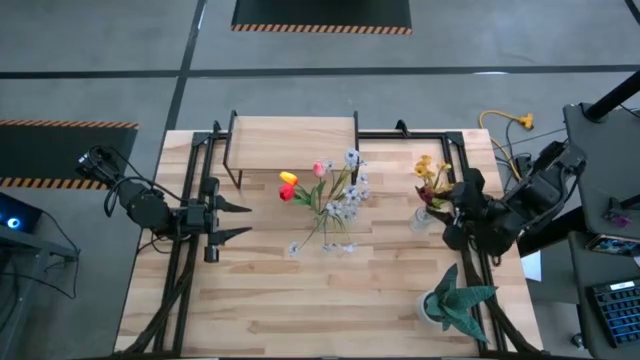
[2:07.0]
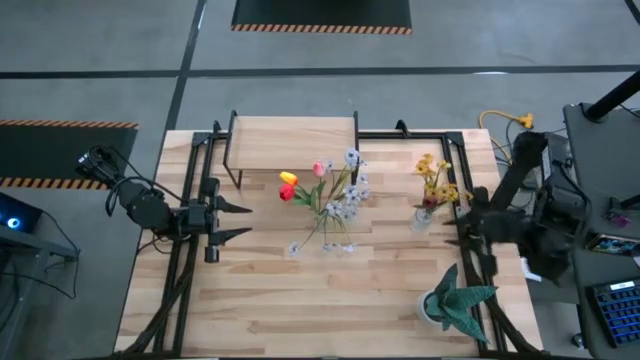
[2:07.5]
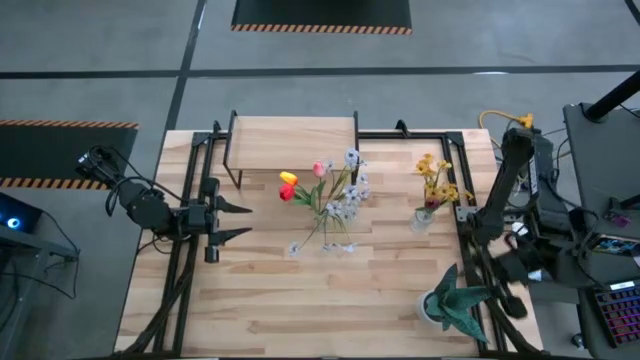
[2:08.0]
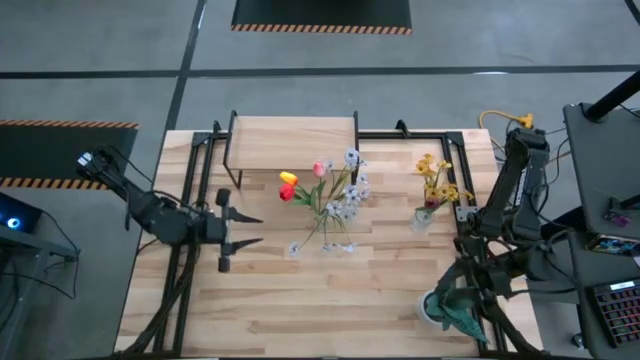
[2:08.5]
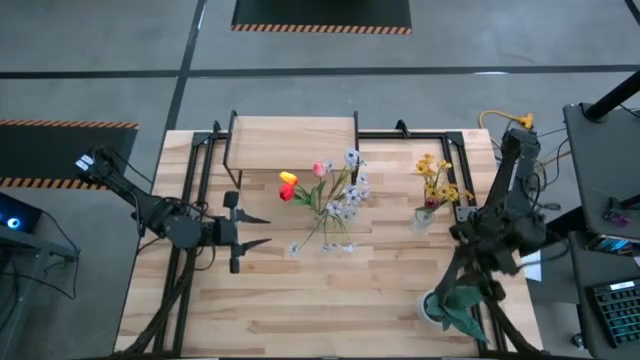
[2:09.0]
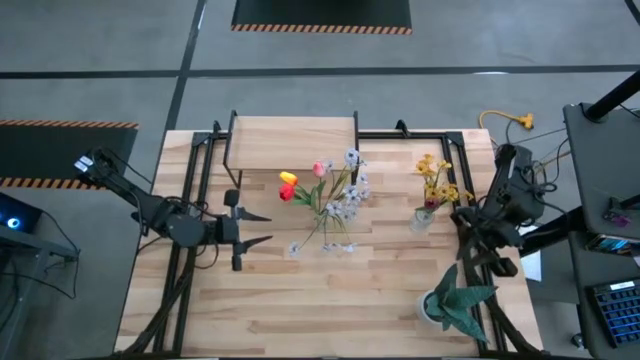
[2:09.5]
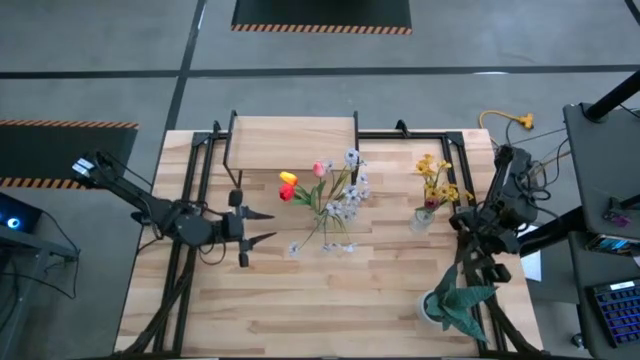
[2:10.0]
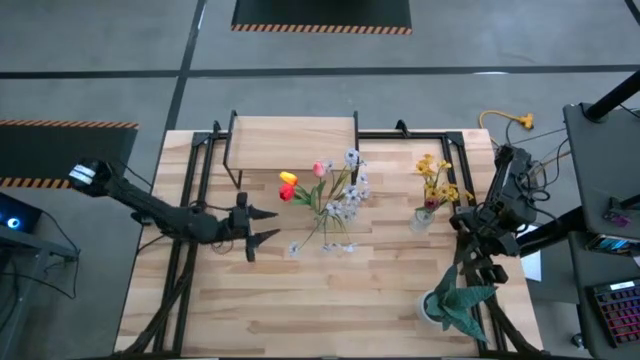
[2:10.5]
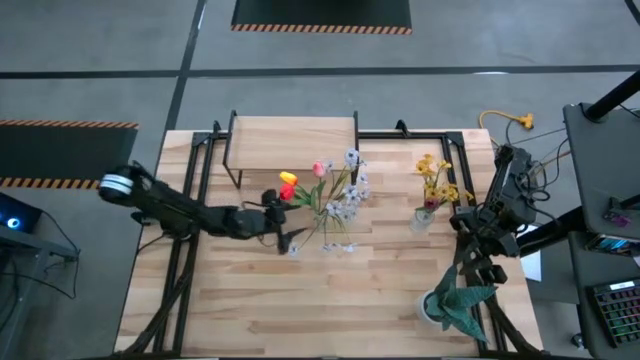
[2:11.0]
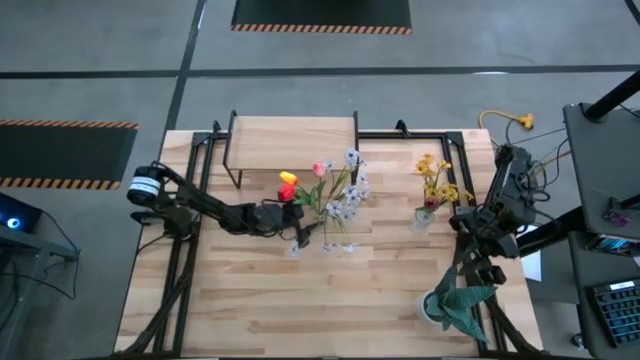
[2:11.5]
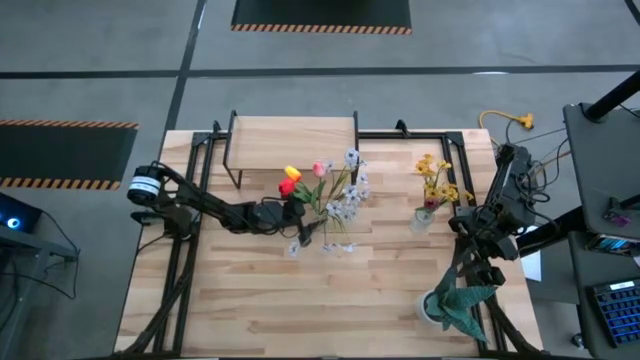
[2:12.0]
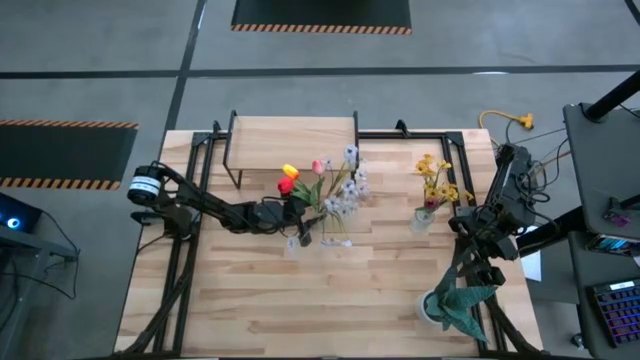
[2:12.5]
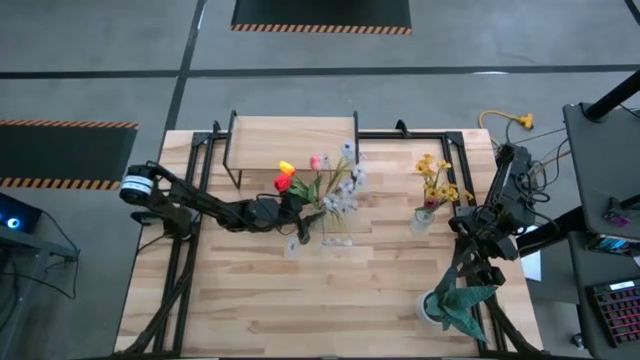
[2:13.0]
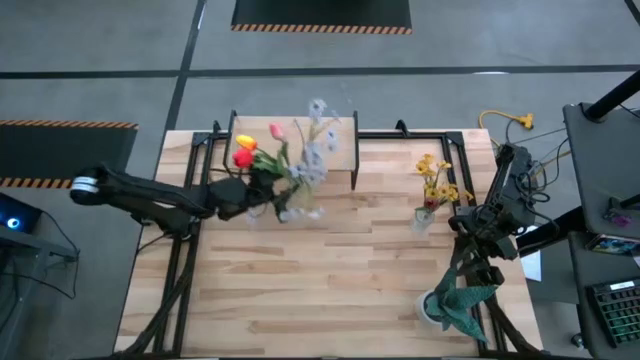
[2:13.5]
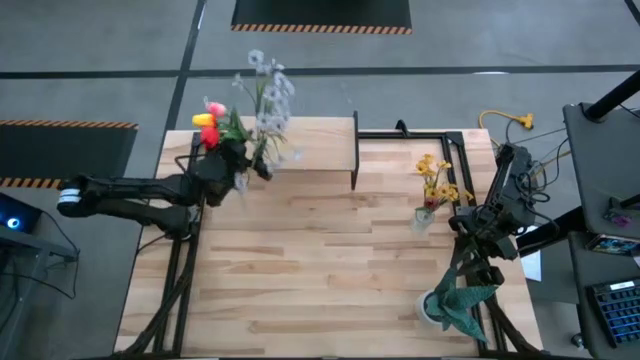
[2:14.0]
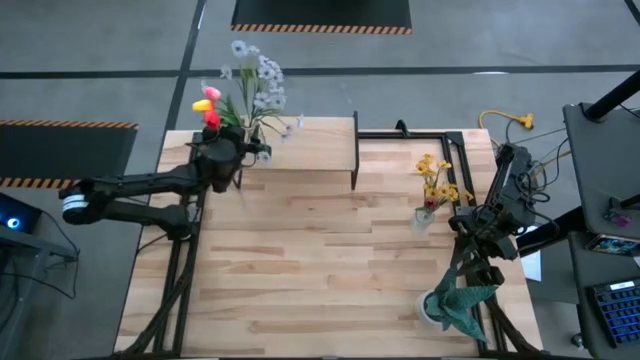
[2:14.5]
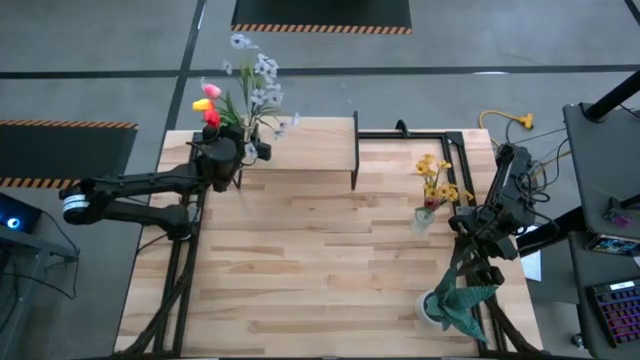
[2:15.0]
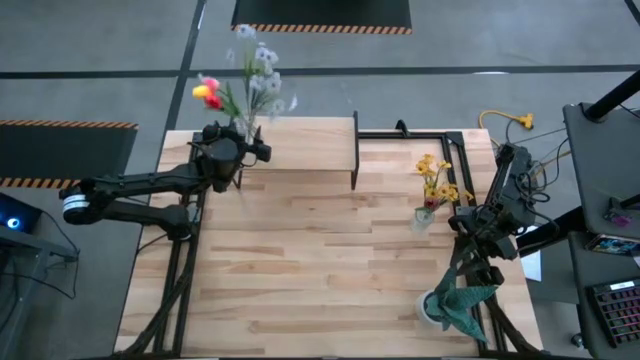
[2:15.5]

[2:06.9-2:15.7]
Task: Pick and place flowers into a vace then onto a shelf
Put the left transparent vase on the shelf

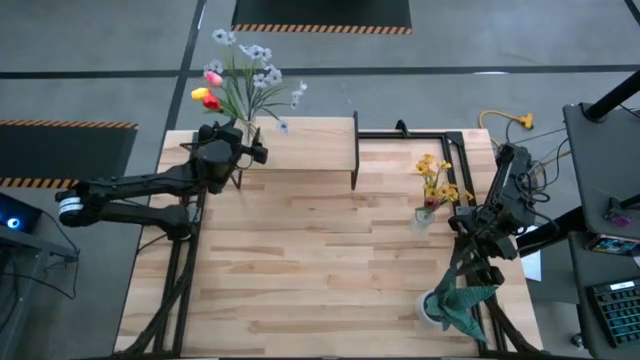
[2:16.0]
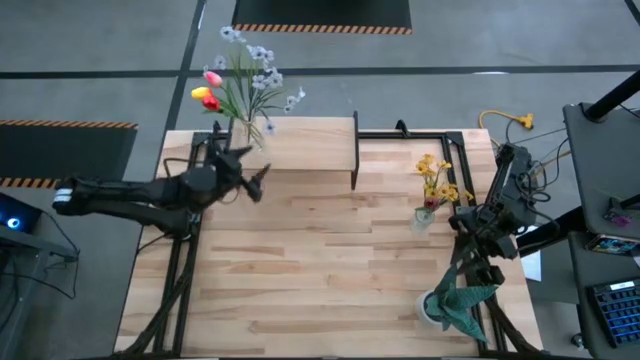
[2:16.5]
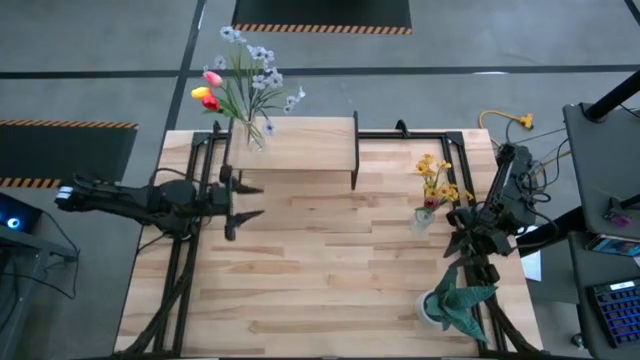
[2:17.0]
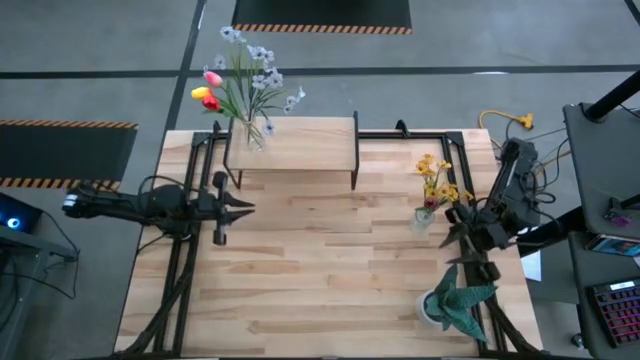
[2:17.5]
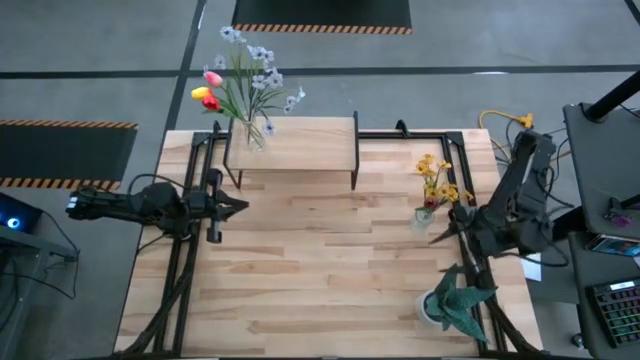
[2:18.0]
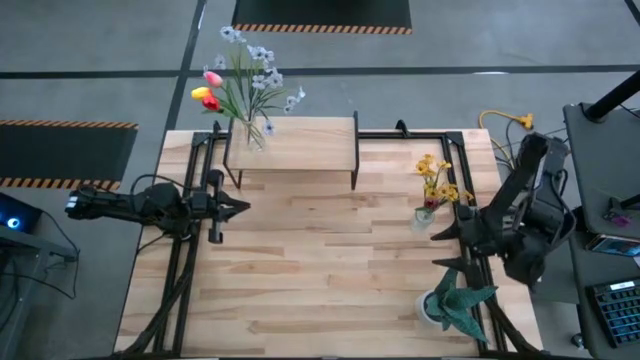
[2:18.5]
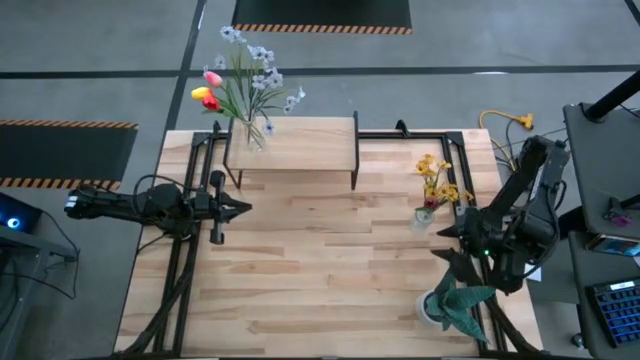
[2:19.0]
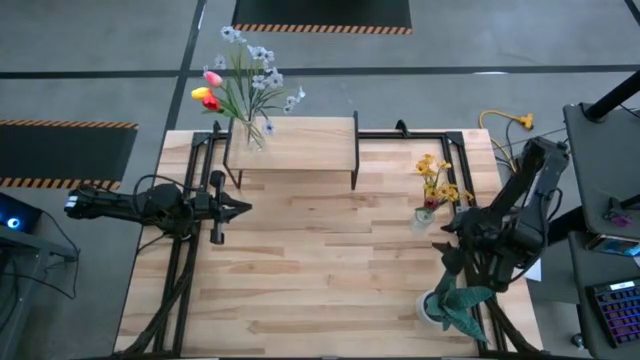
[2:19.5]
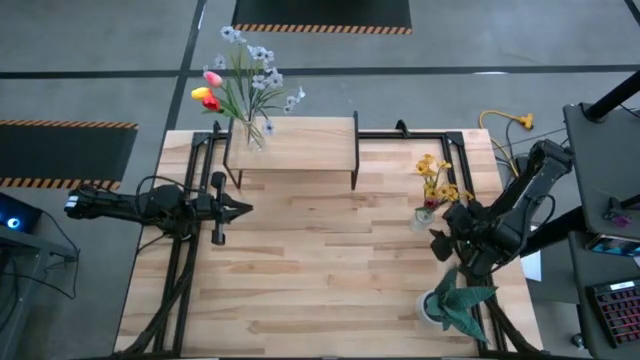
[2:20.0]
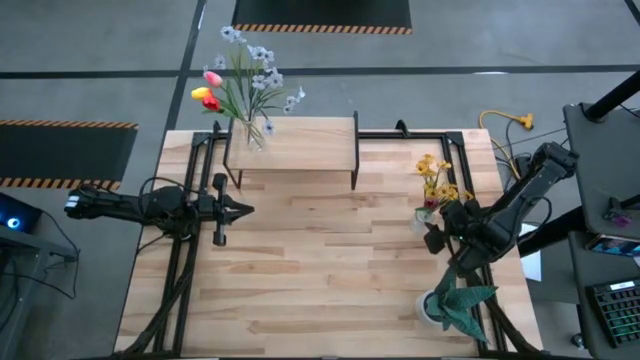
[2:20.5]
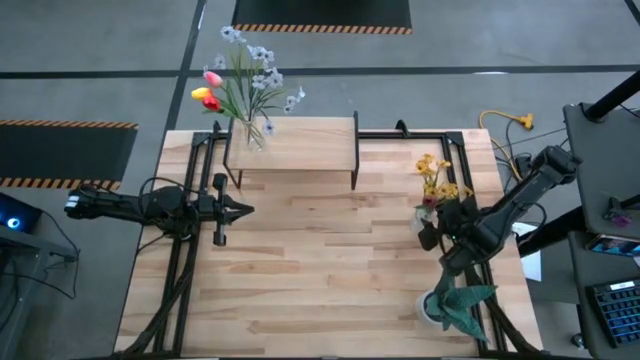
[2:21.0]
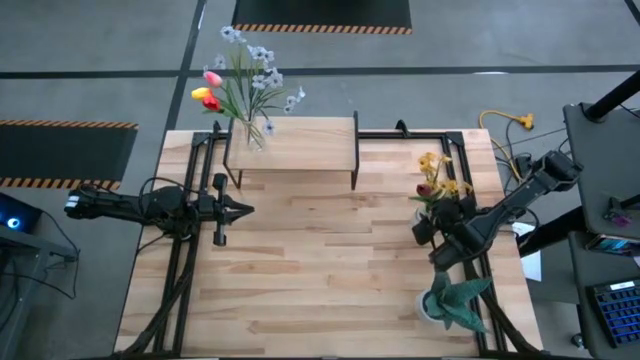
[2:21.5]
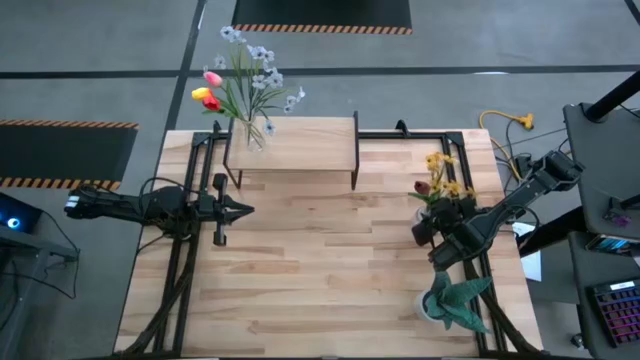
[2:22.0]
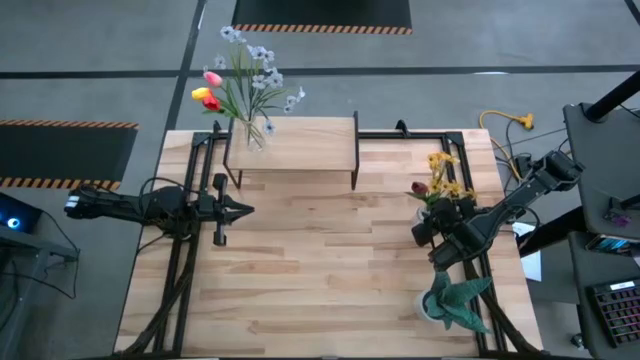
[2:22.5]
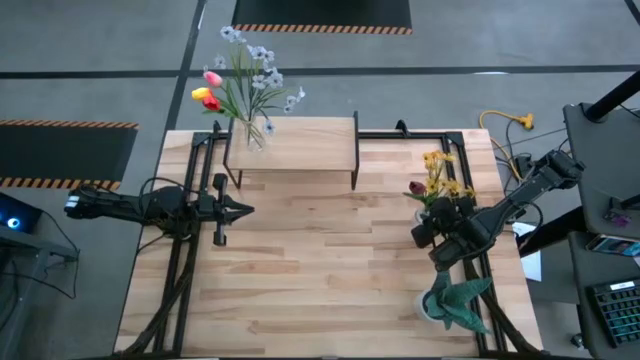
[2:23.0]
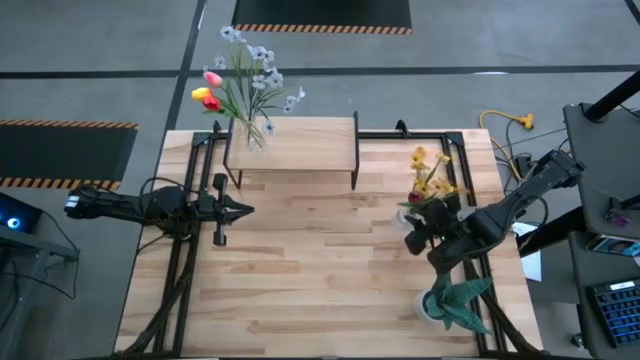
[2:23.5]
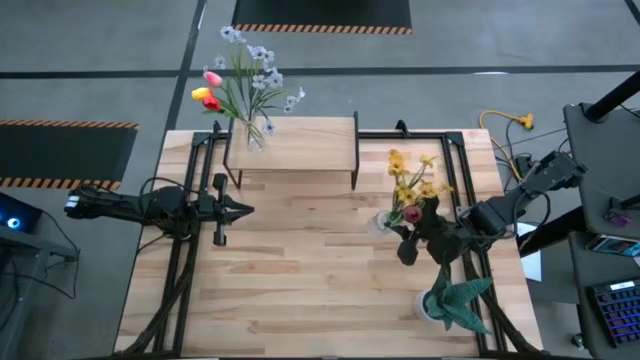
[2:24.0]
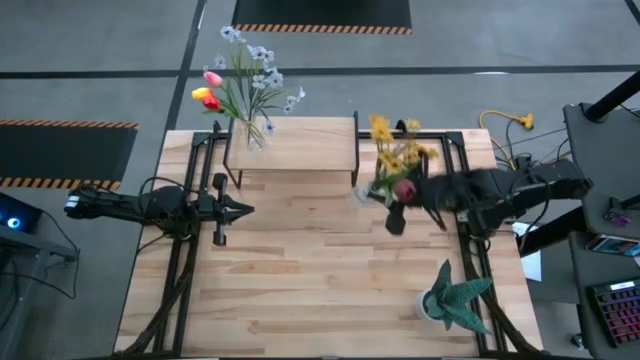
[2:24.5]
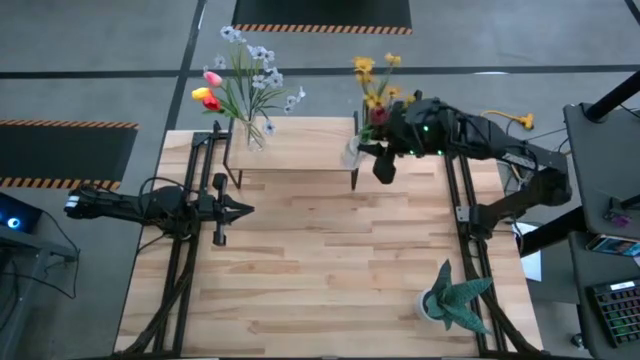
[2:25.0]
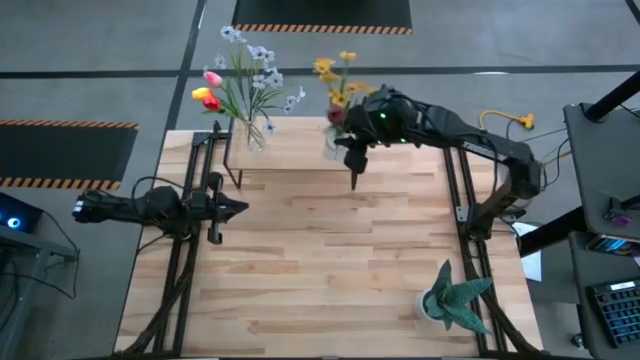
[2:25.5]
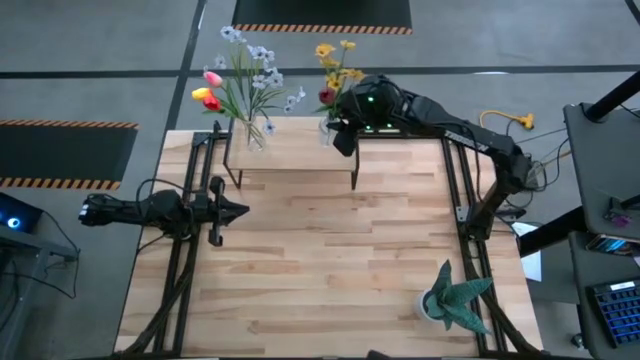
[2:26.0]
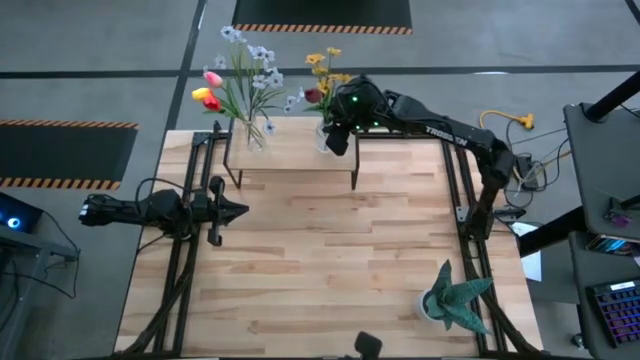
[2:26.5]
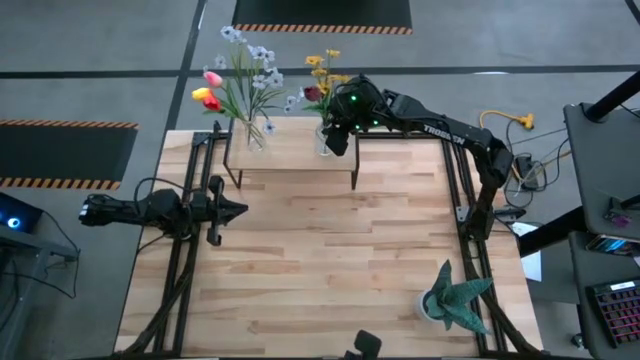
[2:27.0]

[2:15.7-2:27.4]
Put the transparent vase on the shelf

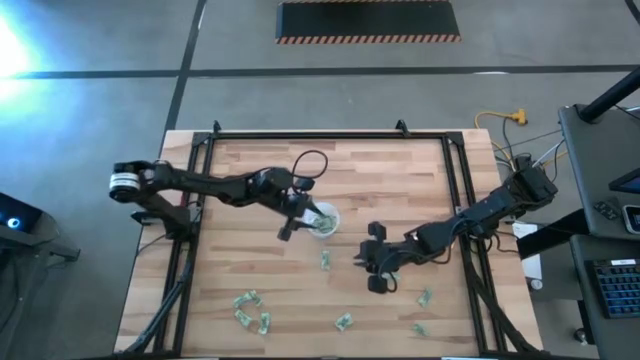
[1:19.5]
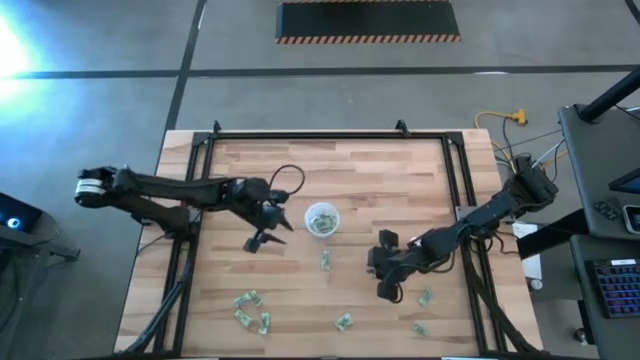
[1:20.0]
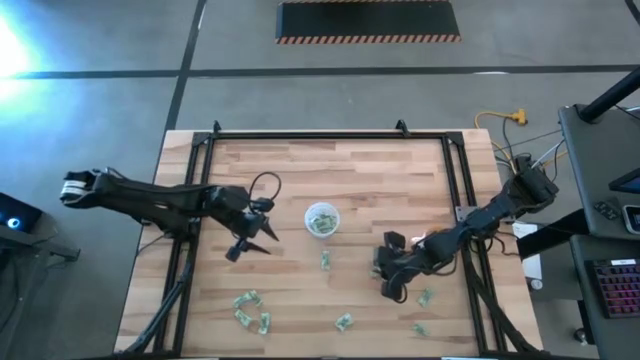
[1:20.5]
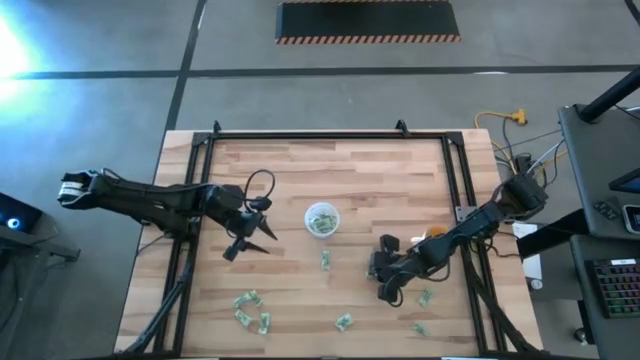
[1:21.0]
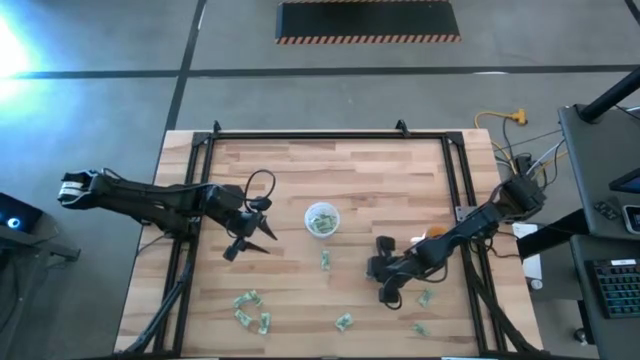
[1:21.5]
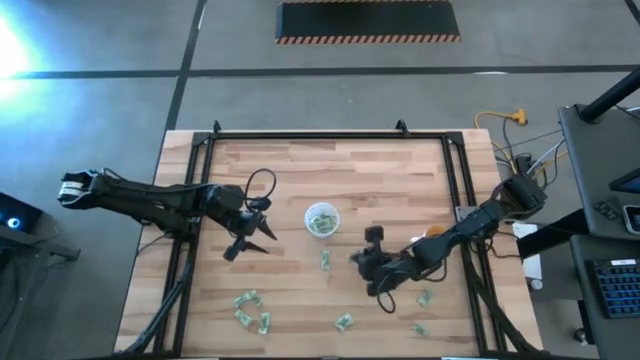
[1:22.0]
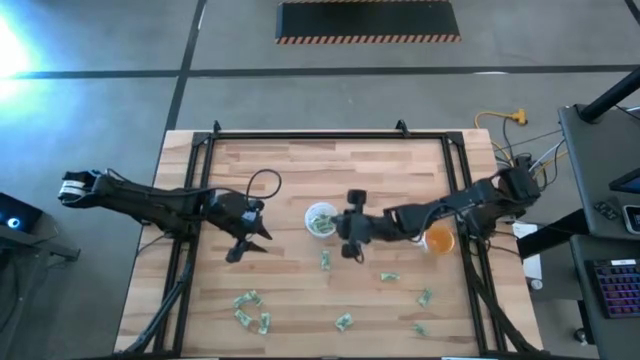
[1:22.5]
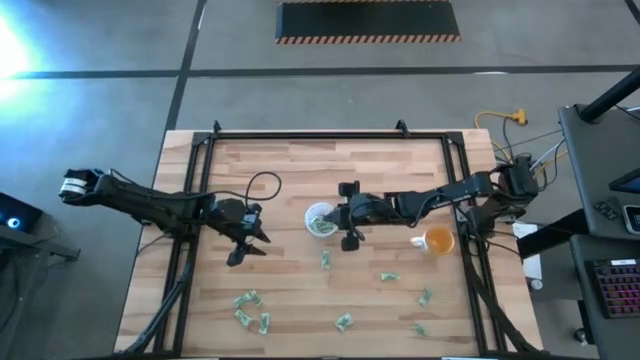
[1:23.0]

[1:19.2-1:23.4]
Task: Pick and place Stevia / Truvia into bins
Put the light green stevia packet into the transparent container
